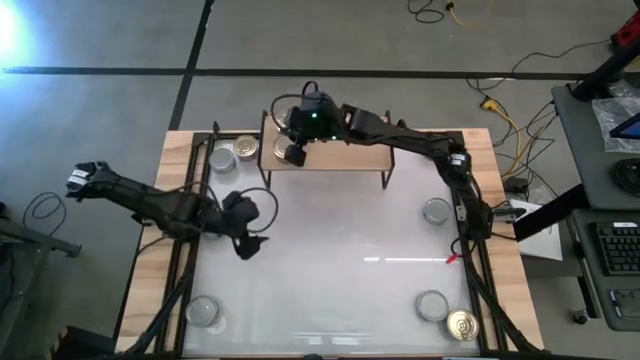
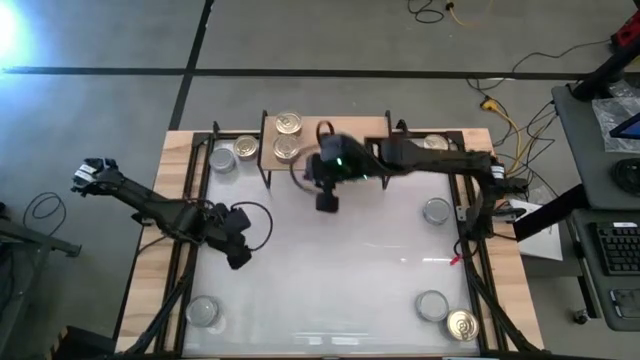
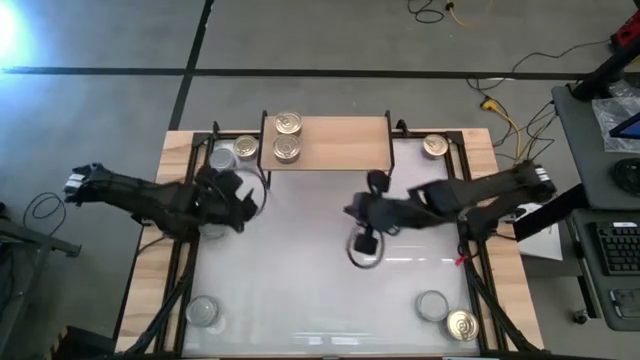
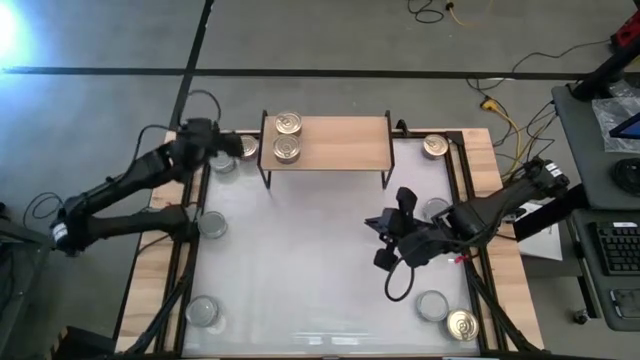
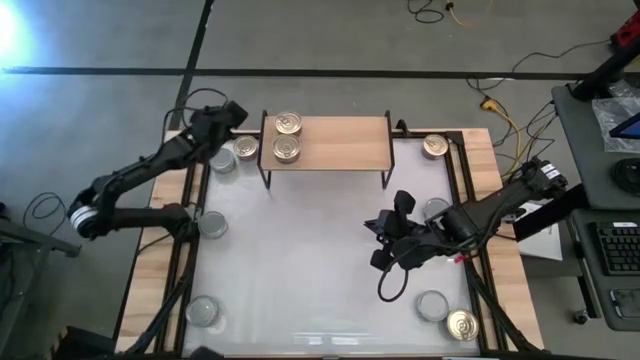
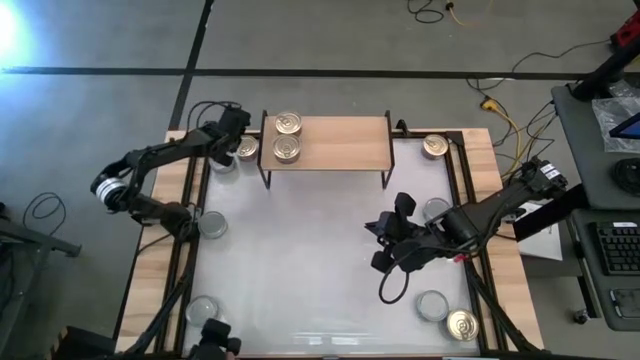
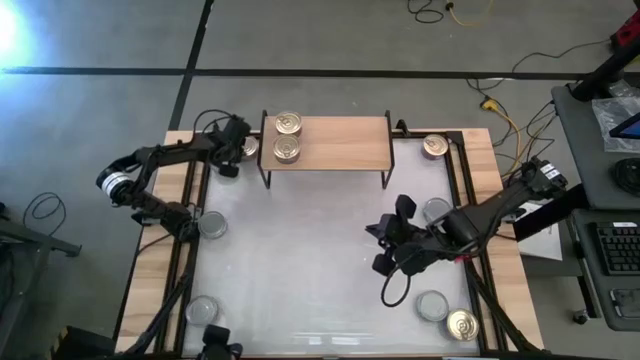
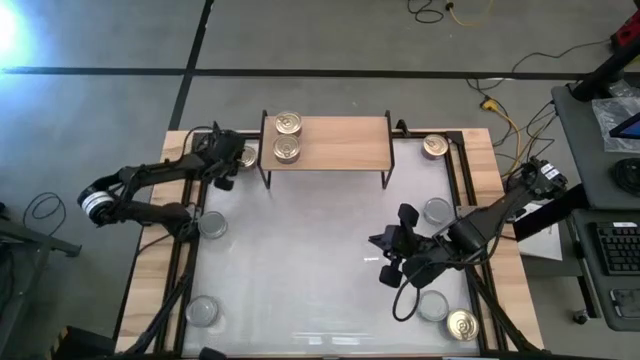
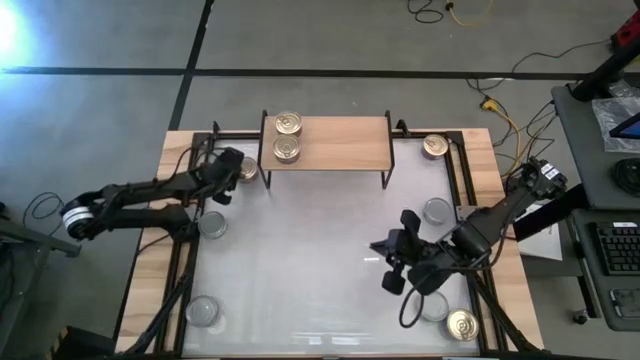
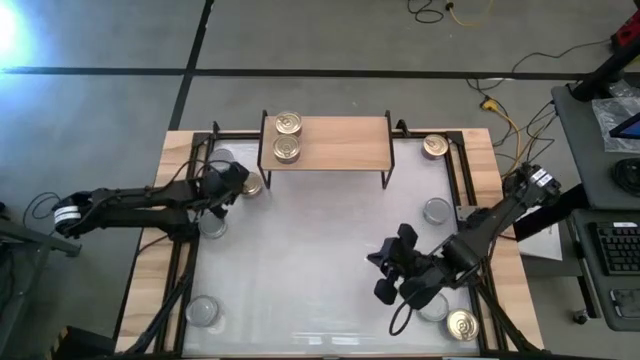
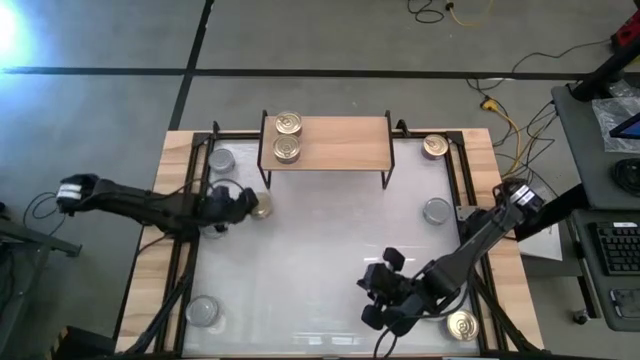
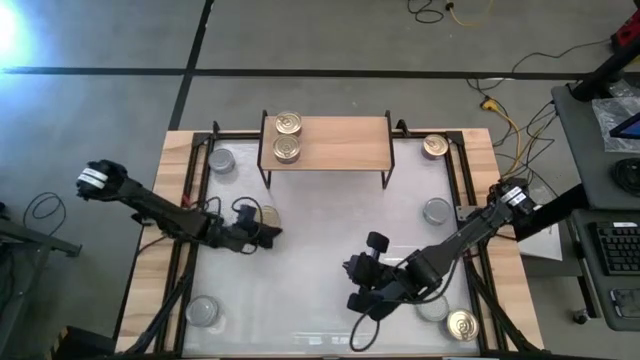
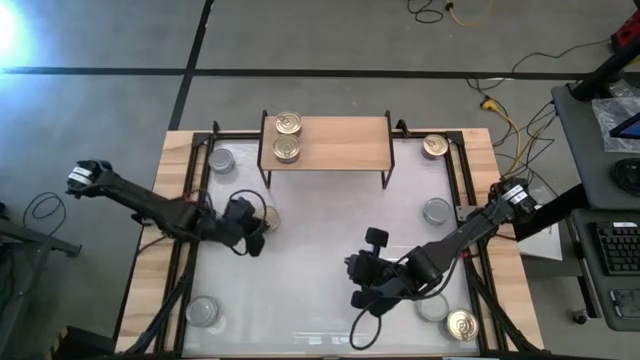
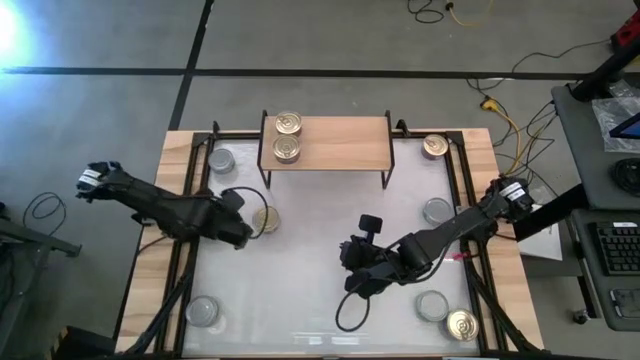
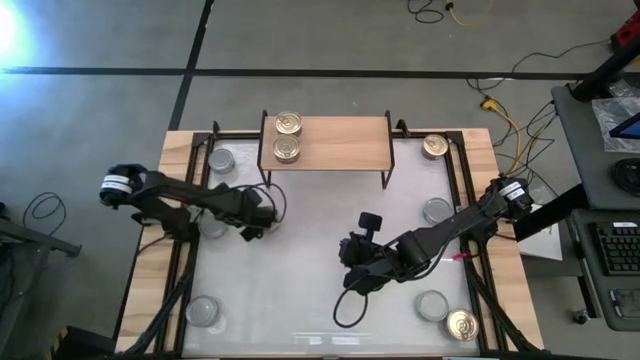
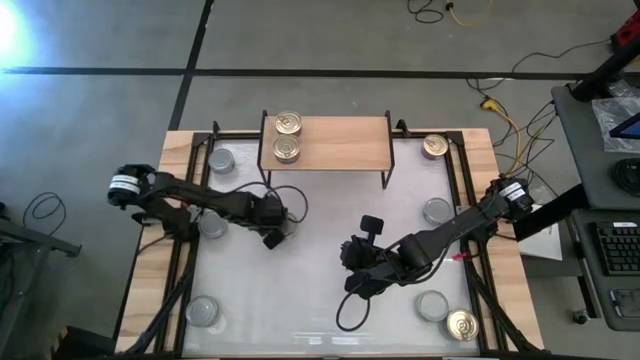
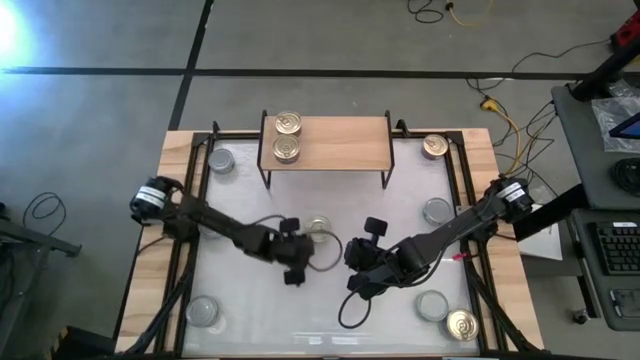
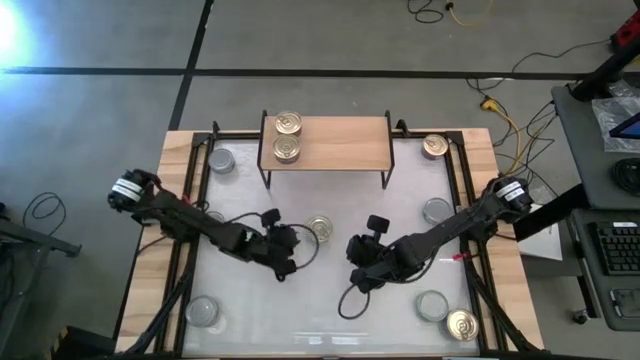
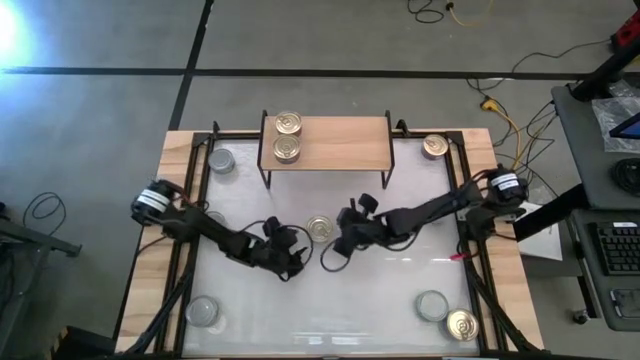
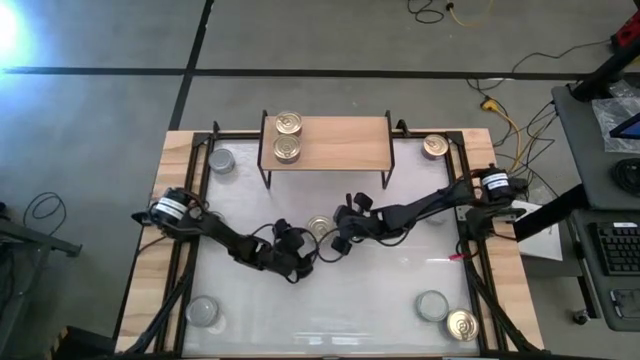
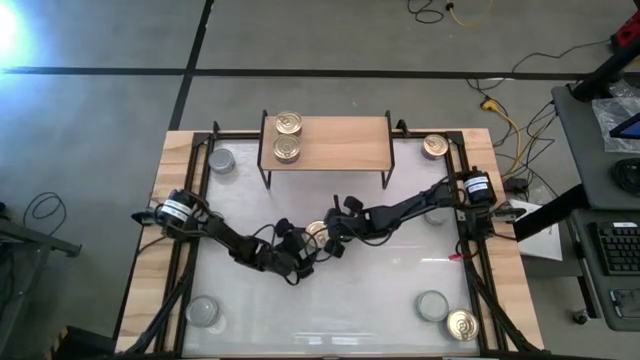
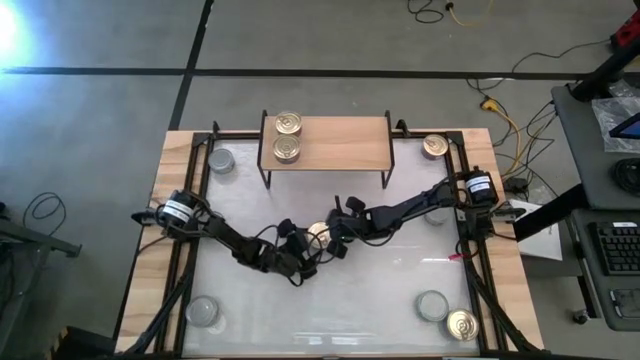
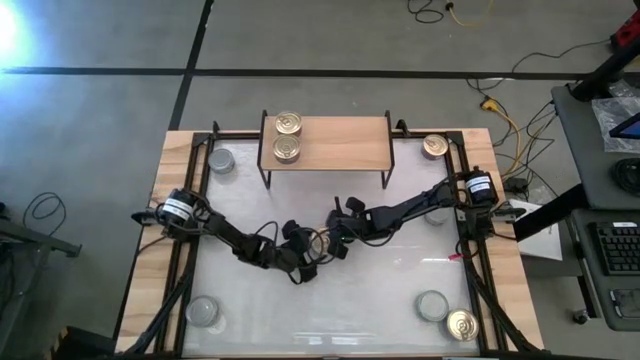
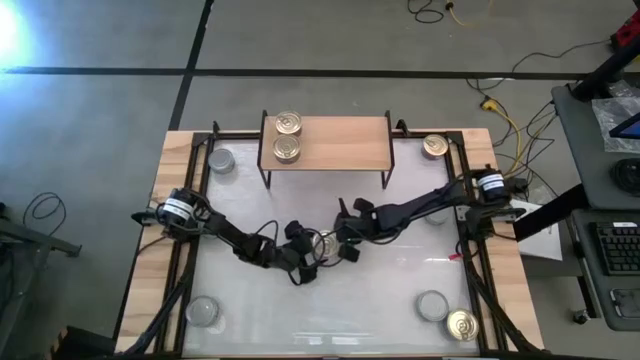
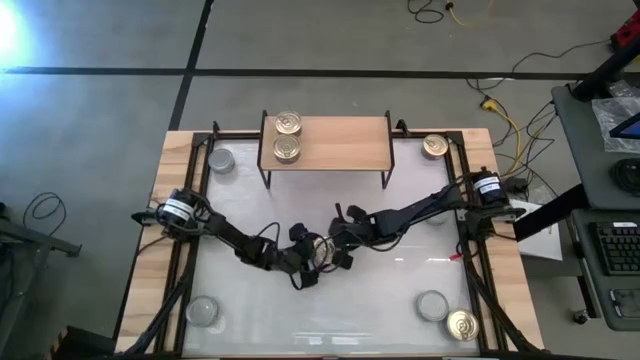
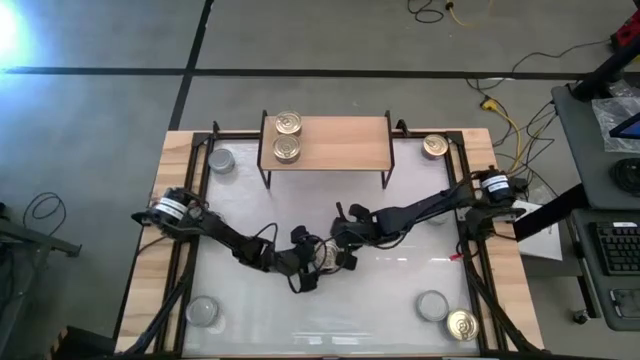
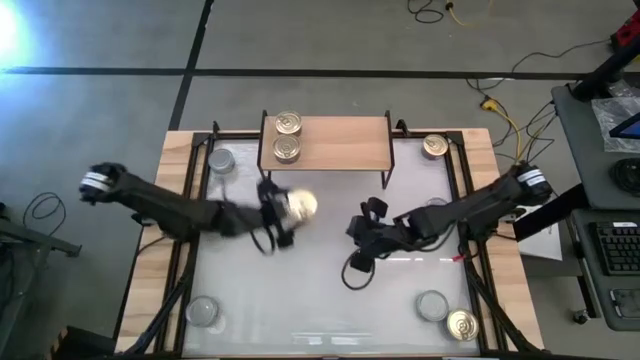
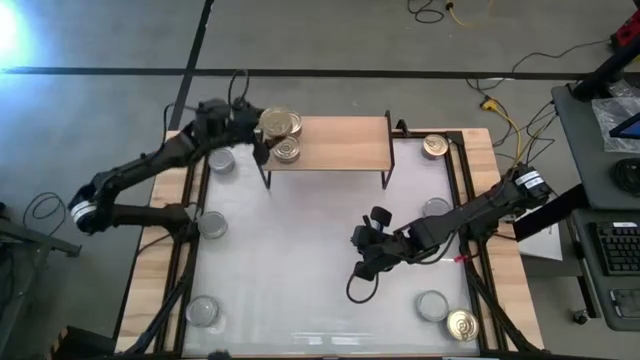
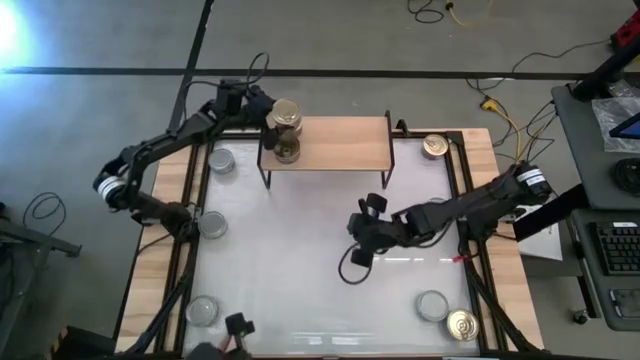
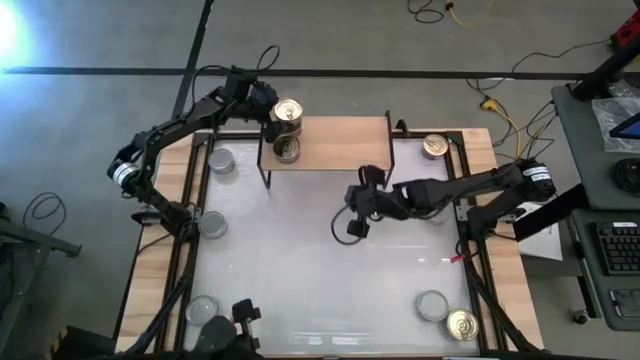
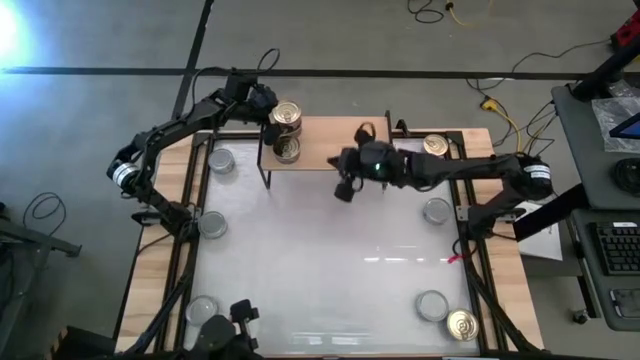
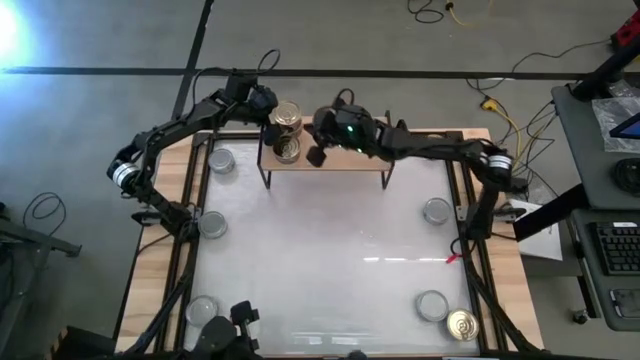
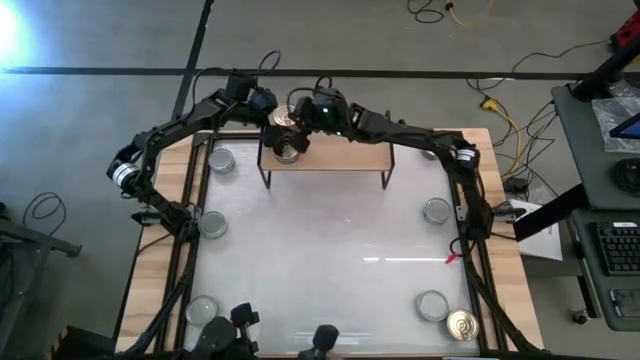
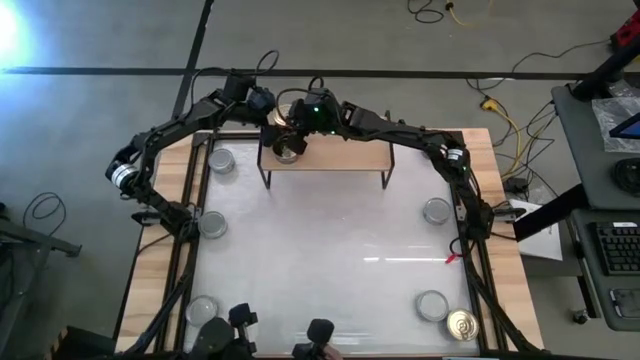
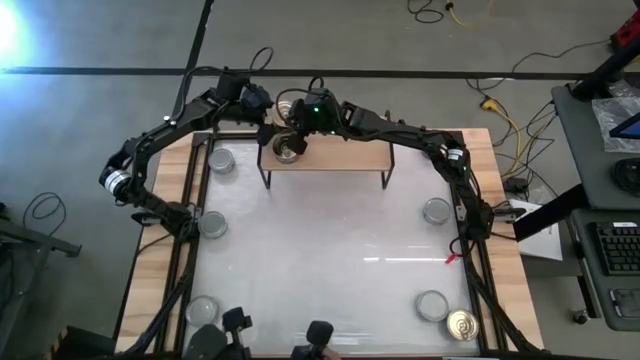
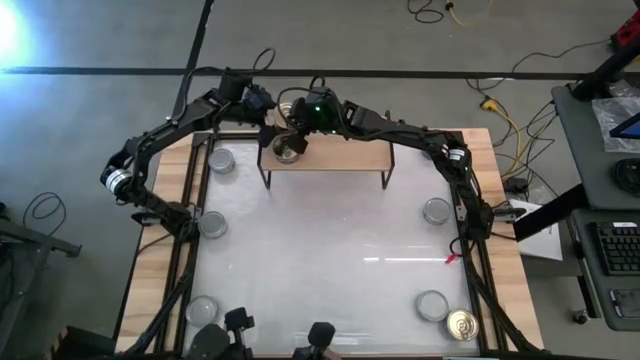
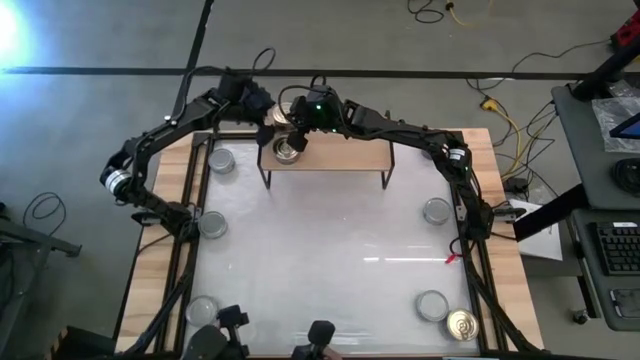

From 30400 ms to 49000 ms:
Task: Stack canned seafood by type on shelf
Stack the blue-pink tuna can on top of the other blue-pink tuna on the shelf

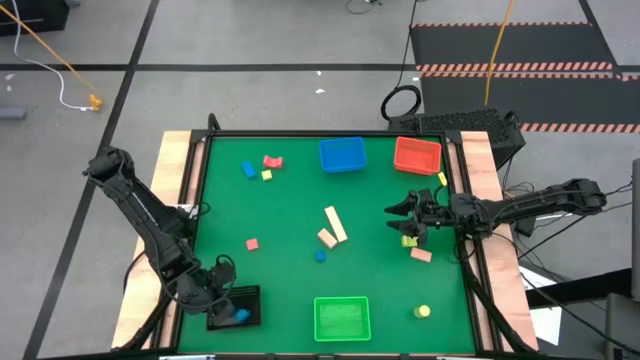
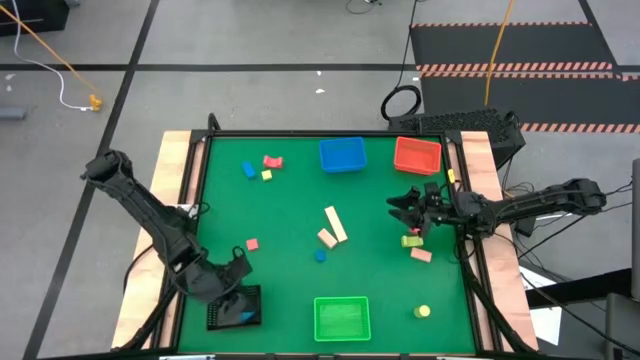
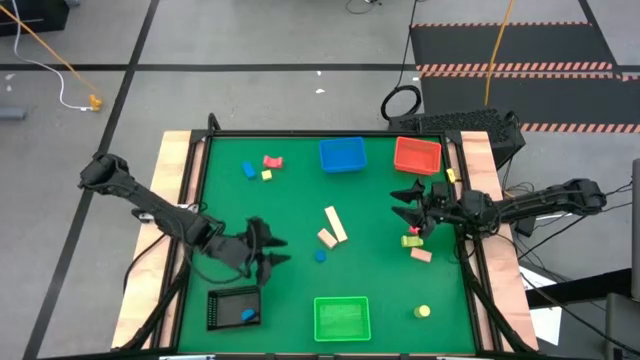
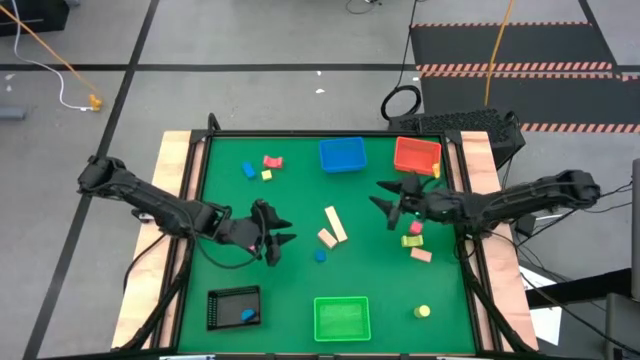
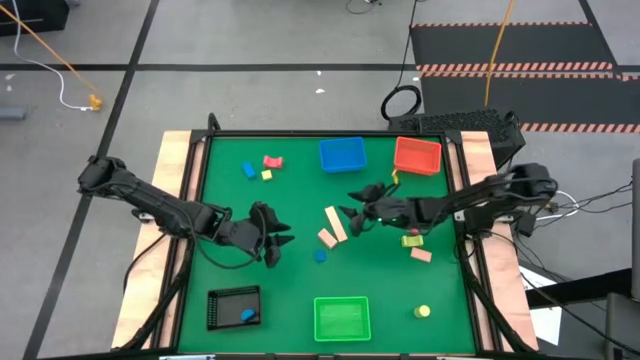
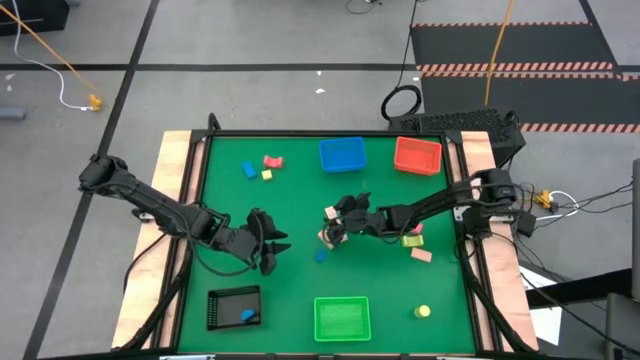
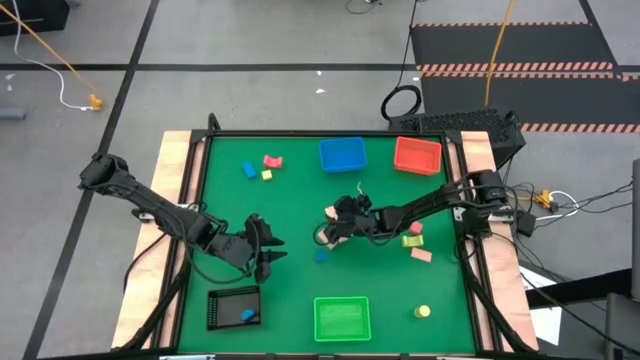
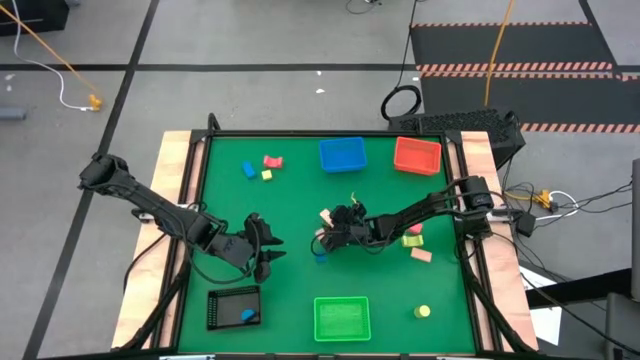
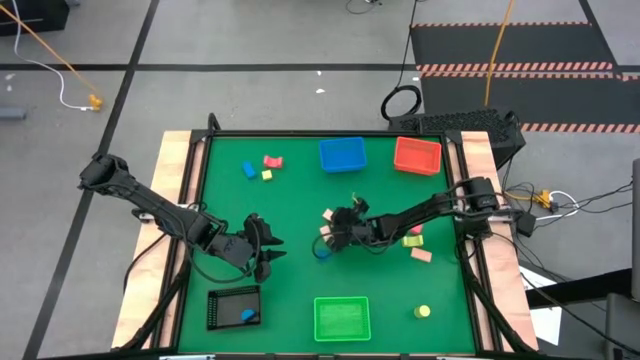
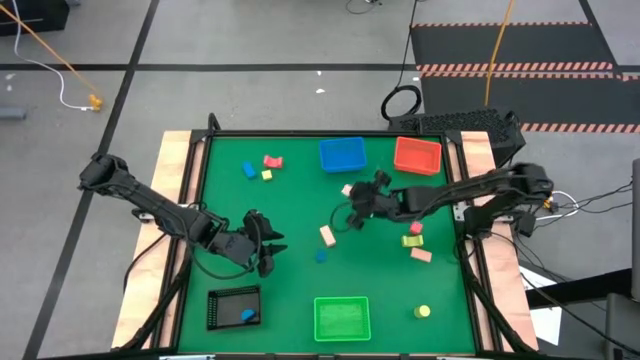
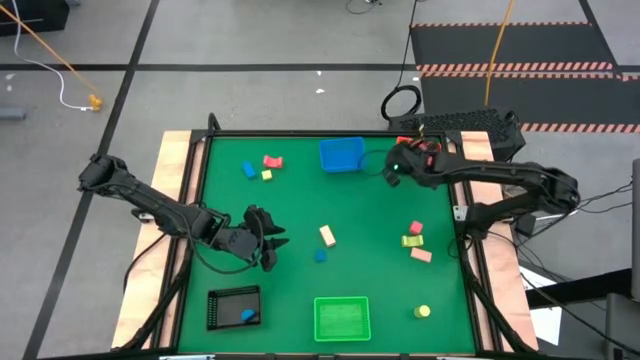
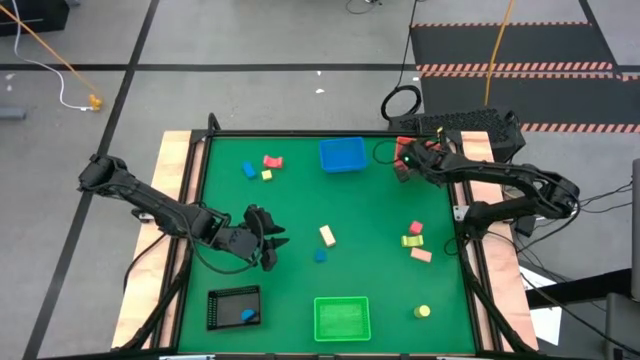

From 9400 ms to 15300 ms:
Task: Sort & place blocks by color
Put the brown block into the orange bin
